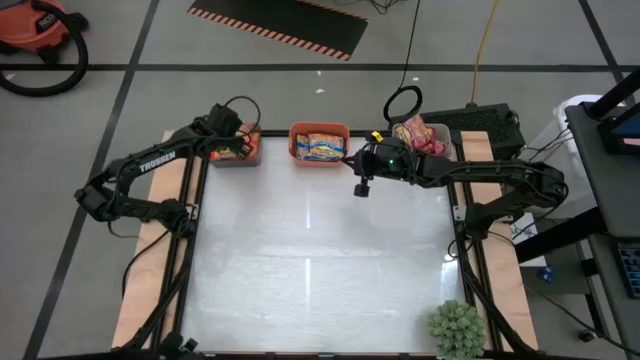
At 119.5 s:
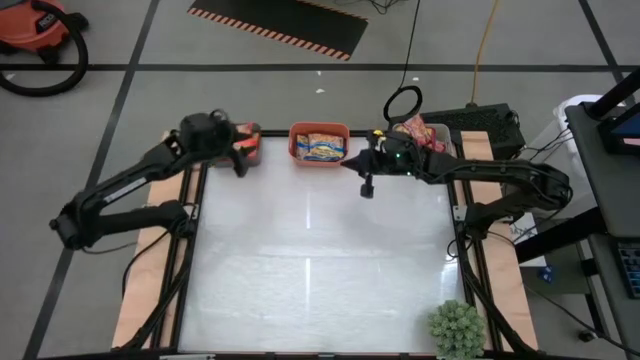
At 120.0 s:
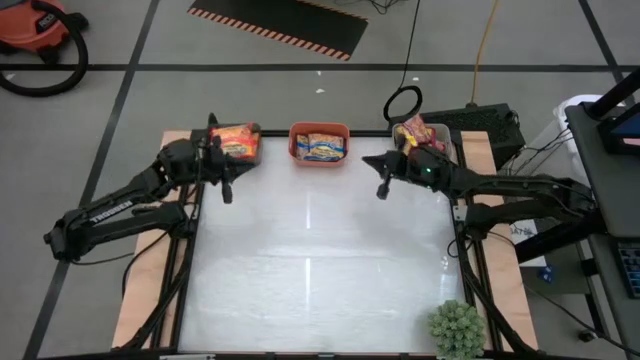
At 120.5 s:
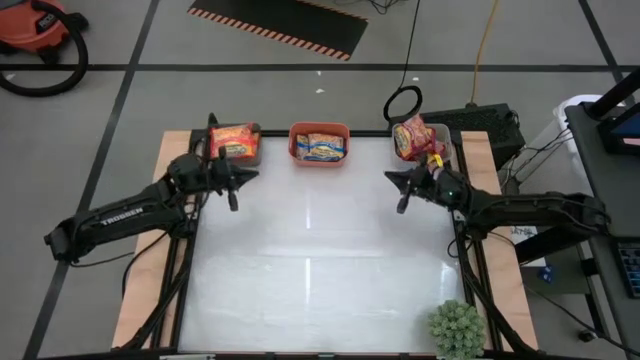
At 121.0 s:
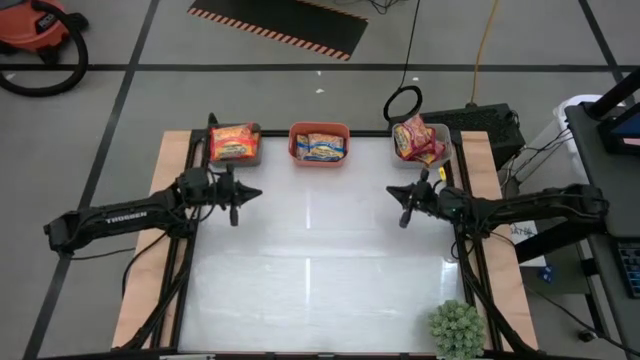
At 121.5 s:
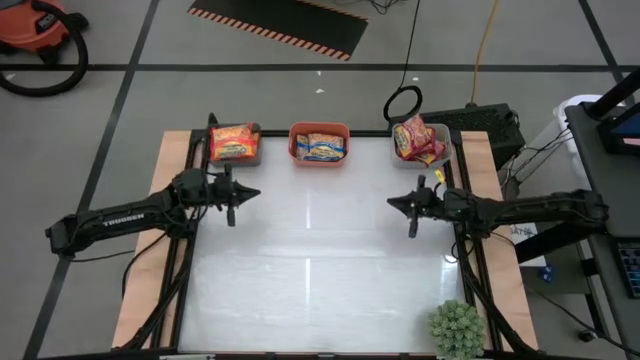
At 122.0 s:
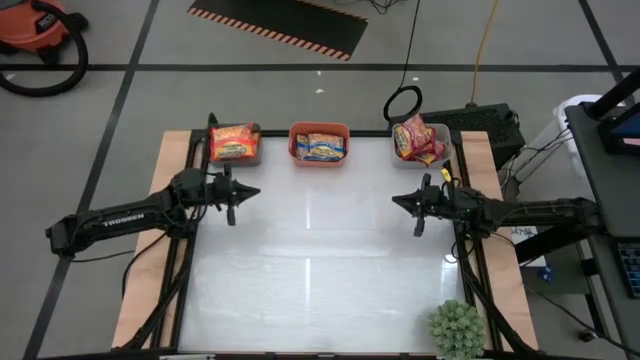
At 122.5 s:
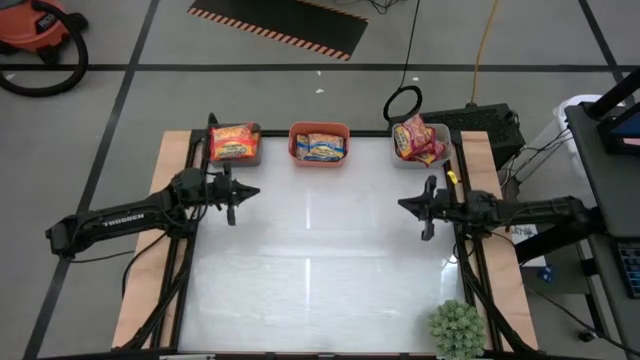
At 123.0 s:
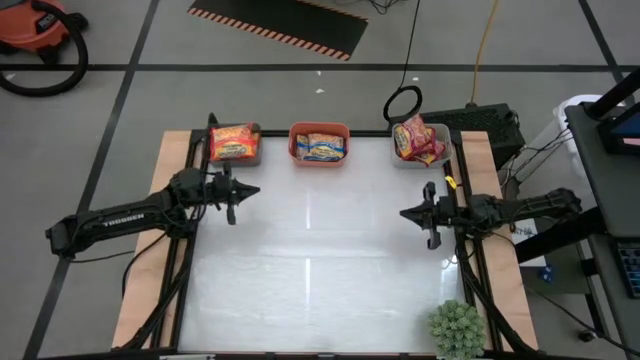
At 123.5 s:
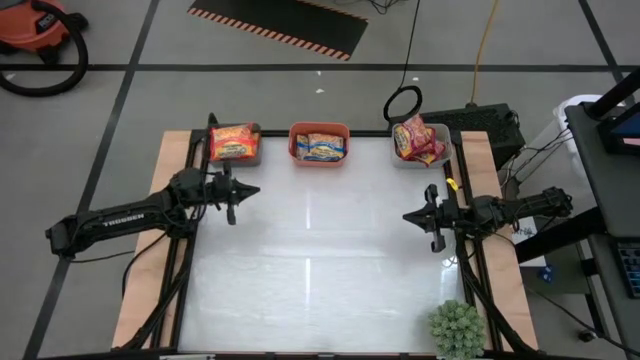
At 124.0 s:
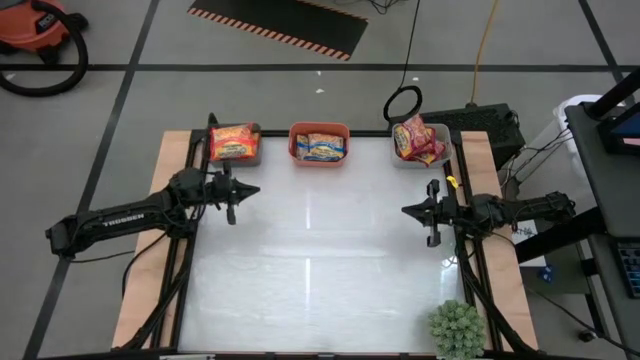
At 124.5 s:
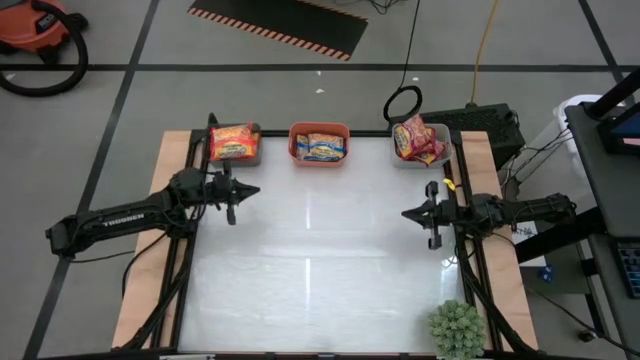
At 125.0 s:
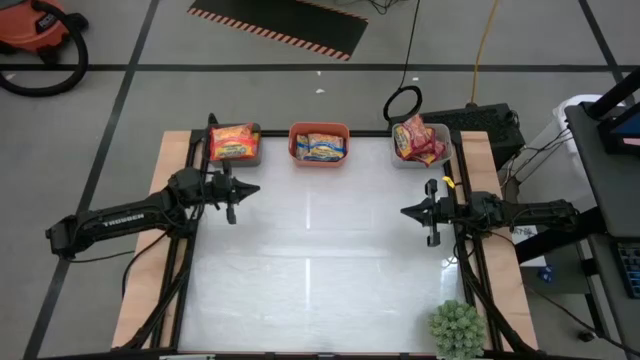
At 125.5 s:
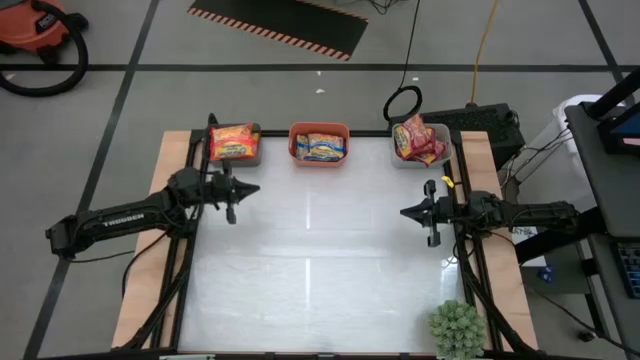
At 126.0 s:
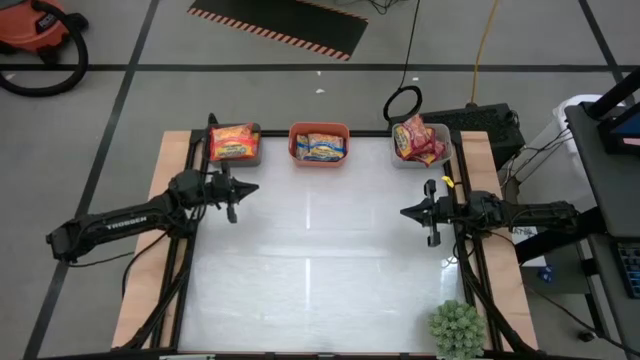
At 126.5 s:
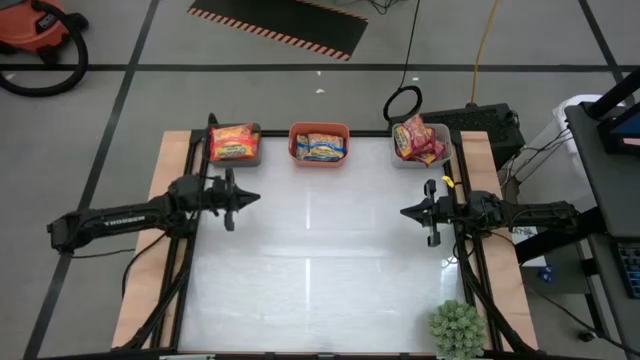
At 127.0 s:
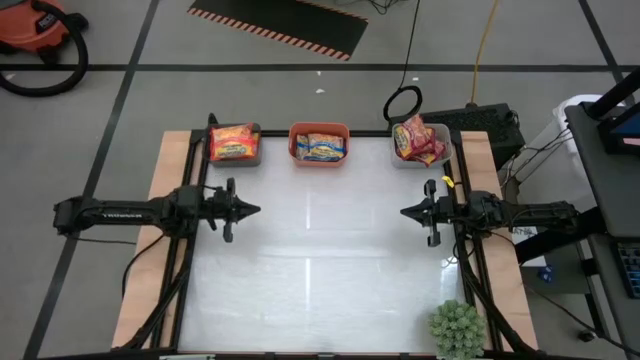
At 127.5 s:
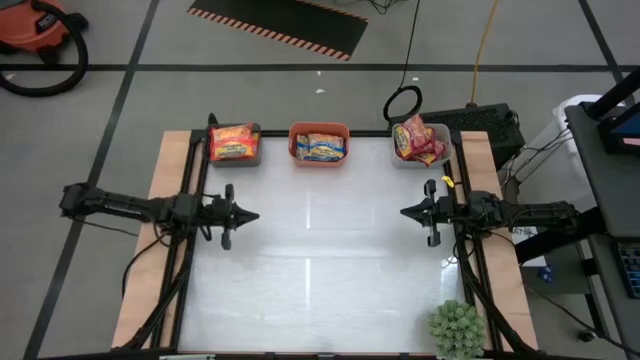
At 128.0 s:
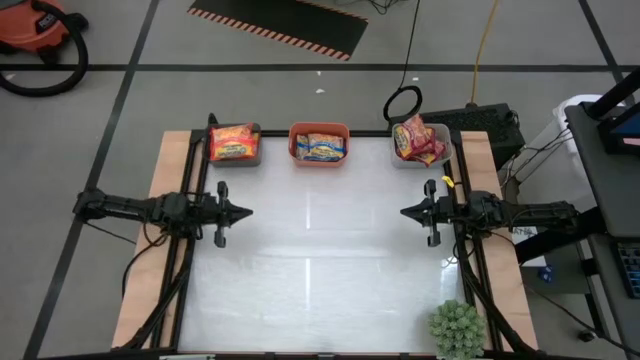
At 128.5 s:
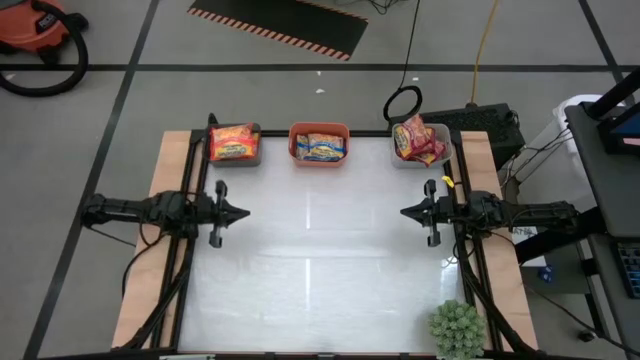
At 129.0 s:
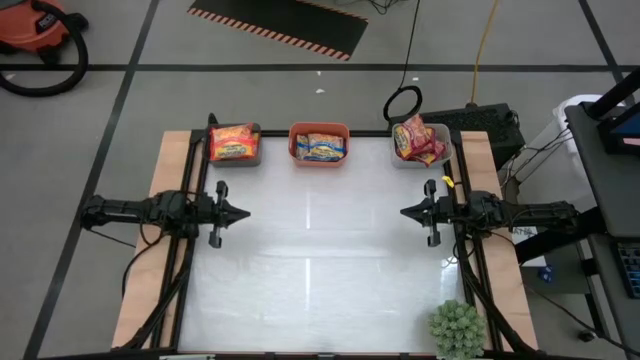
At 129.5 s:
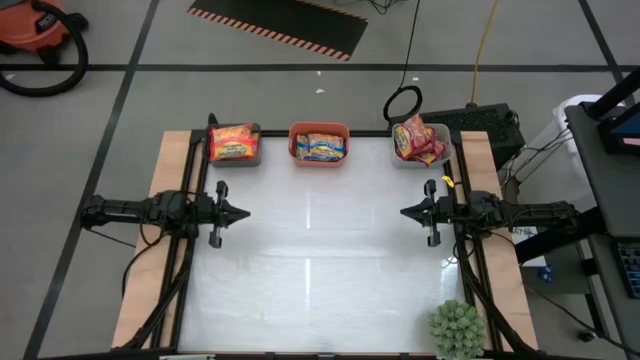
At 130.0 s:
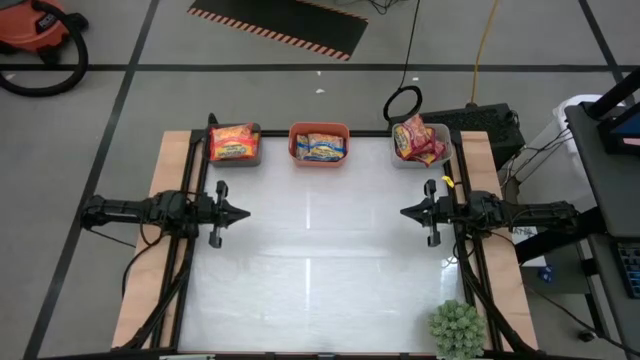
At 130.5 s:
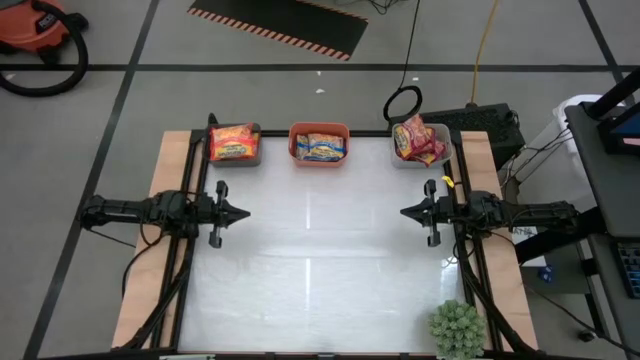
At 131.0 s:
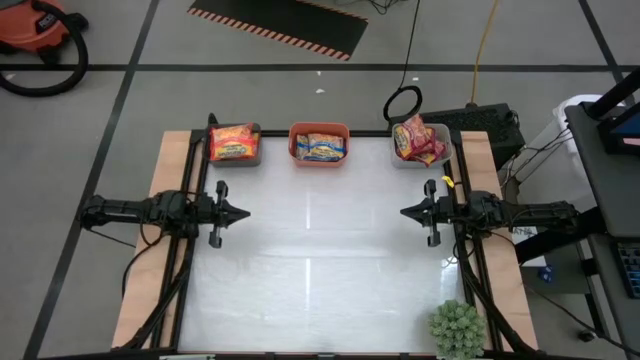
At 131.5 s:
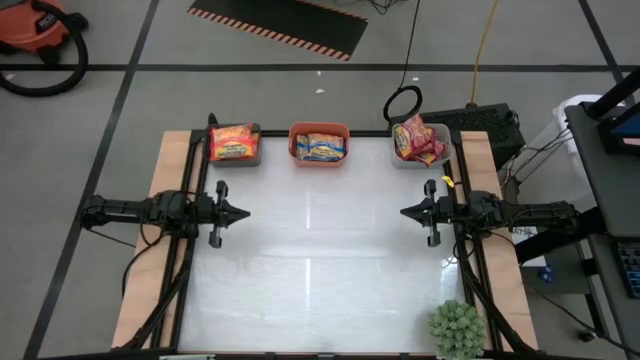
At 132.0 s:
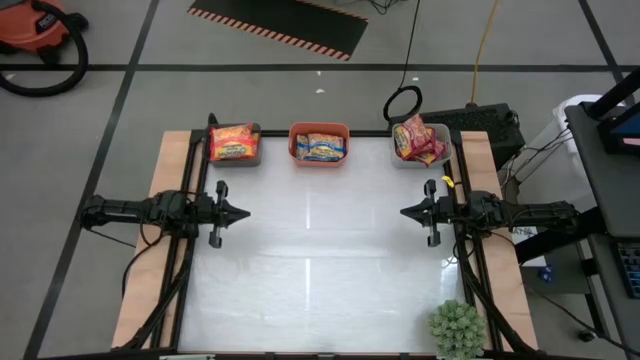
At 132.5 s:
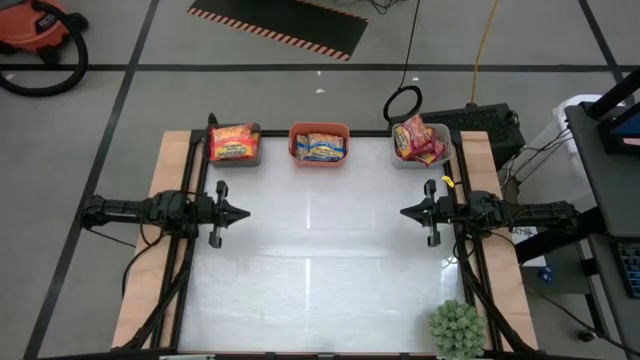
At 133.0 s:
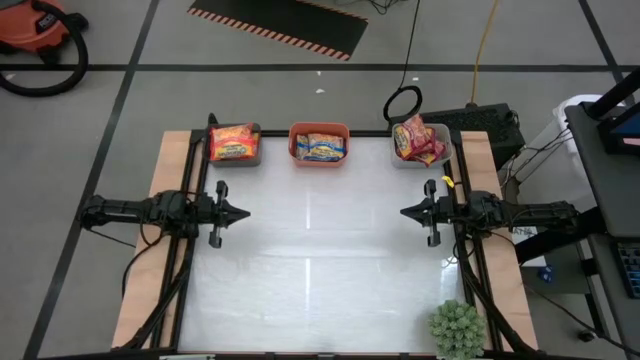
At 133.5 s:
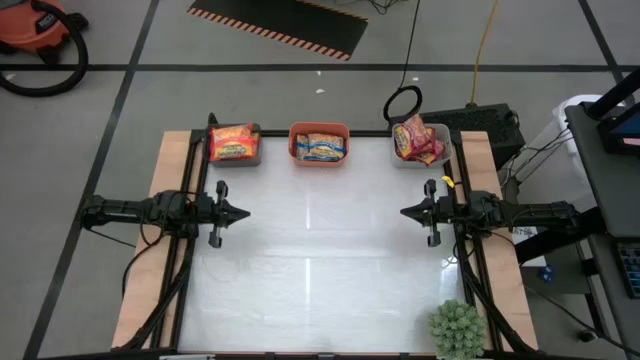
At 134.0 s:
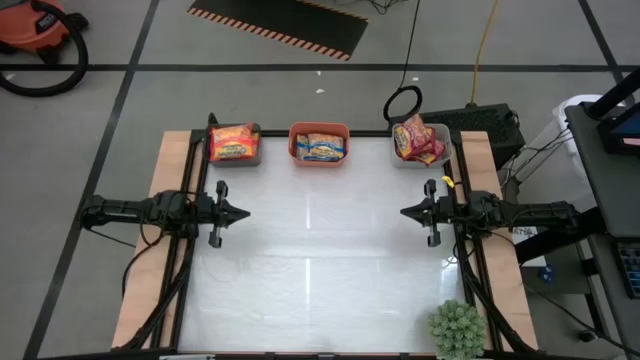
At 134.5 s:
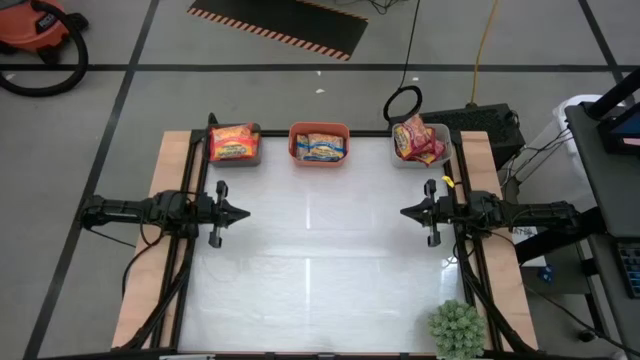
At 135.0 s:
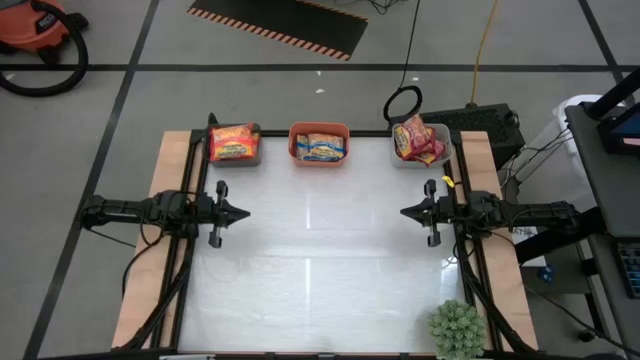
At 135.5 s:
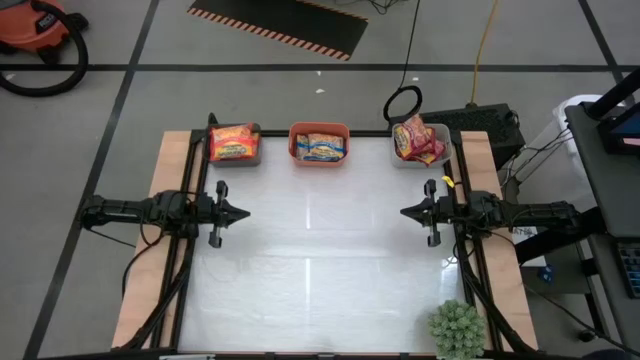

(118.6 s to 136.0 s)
Task: Sort Maruchan noodles
Return to Home Position

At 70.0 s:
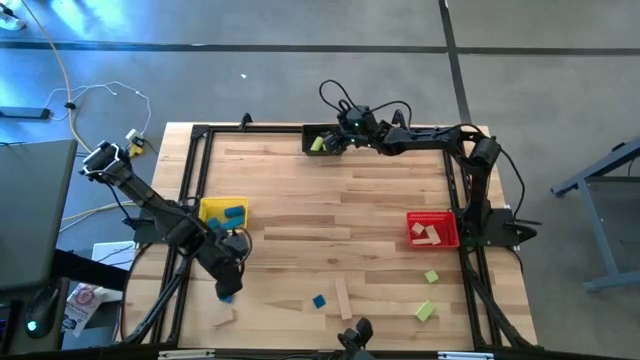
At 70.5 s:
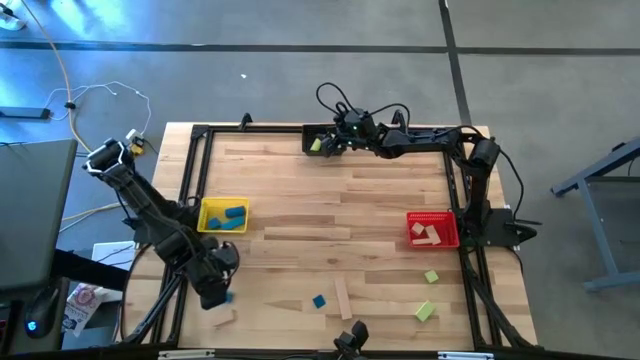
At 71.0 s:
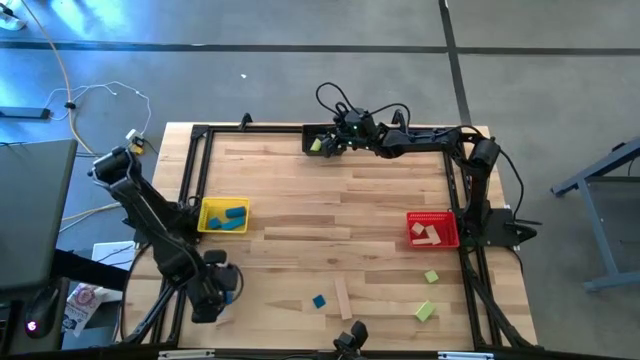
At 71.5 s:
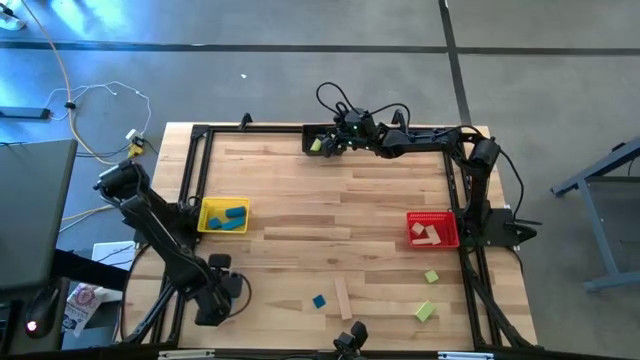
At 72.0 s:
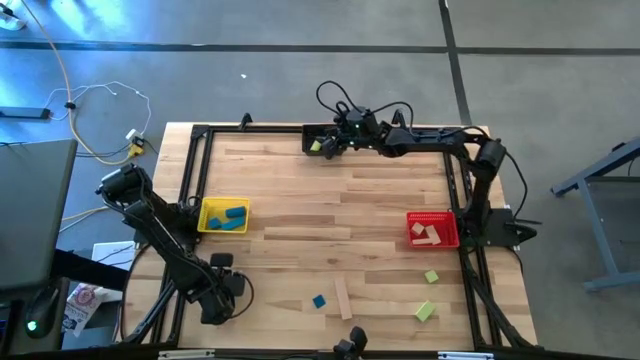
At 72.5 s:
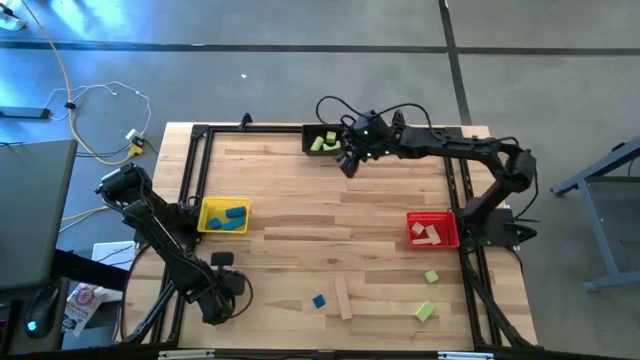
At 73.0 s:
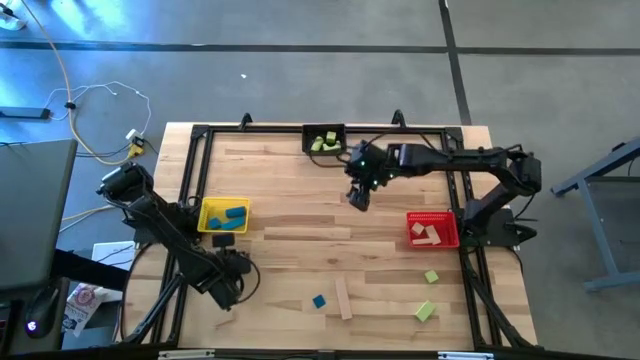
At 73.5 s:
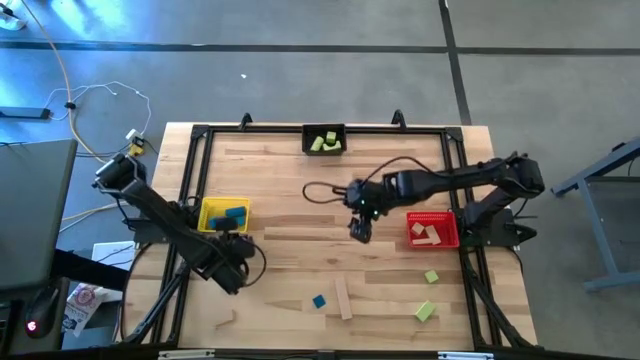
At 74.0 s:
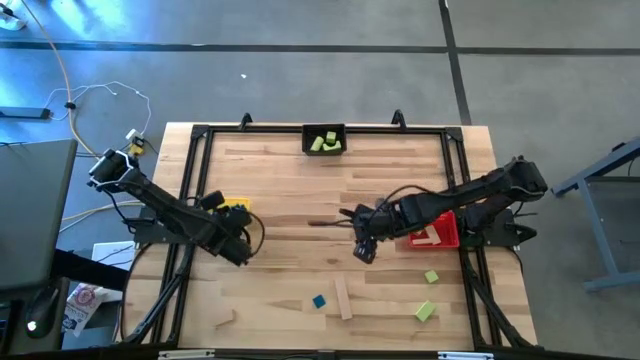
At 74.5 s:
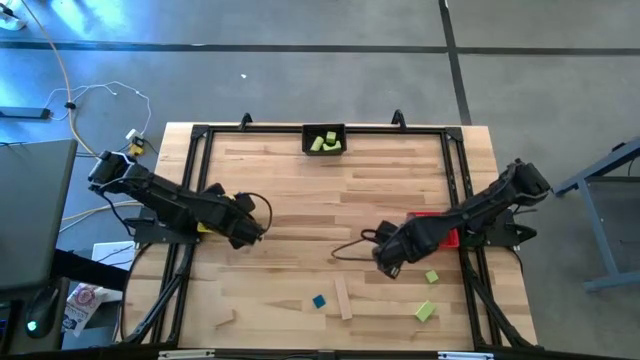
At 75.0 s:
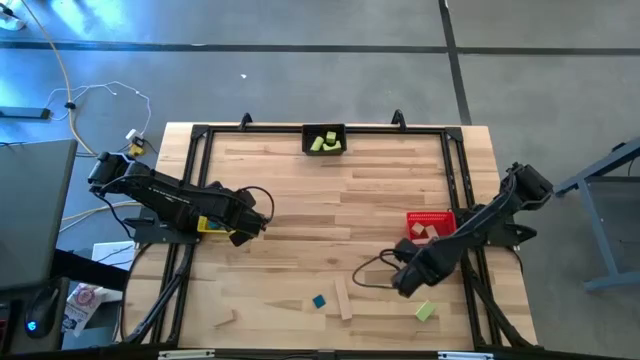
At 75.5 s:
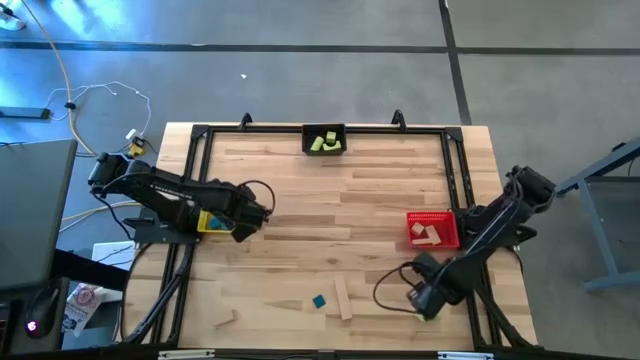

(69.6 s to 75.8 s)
Task: Sort & place blocks by color
Put the blue block into the yellow bin
